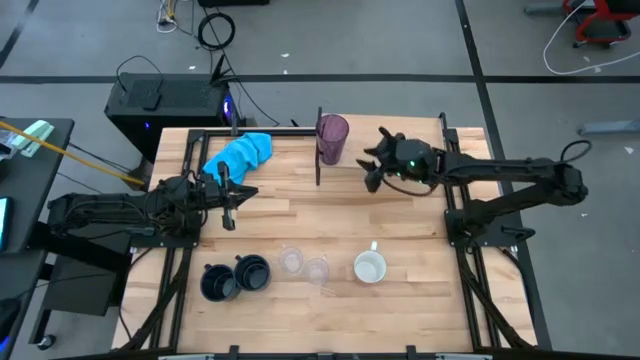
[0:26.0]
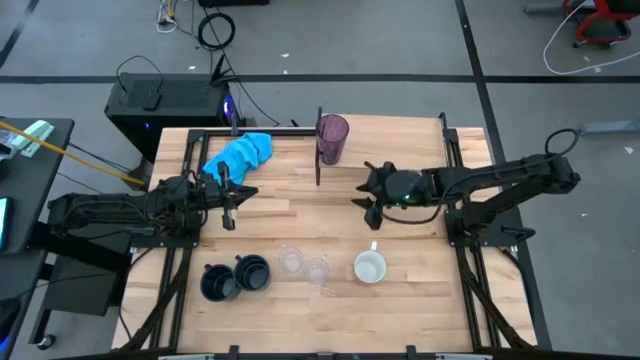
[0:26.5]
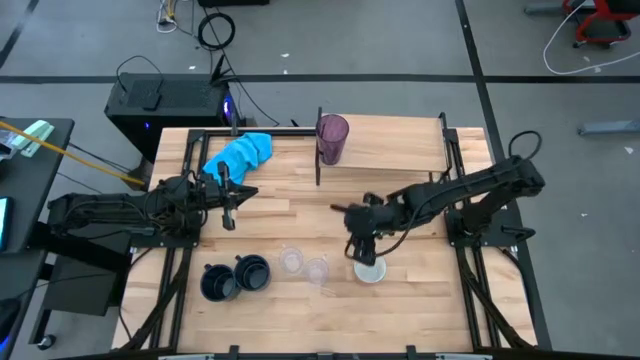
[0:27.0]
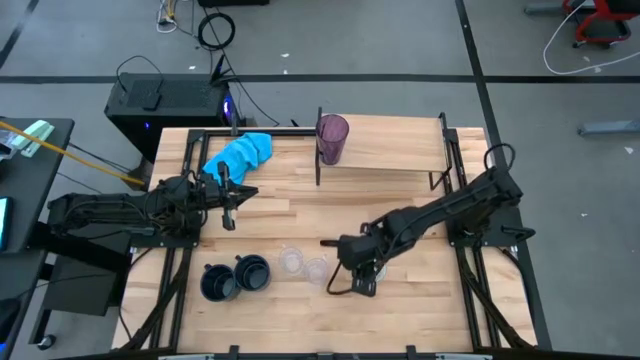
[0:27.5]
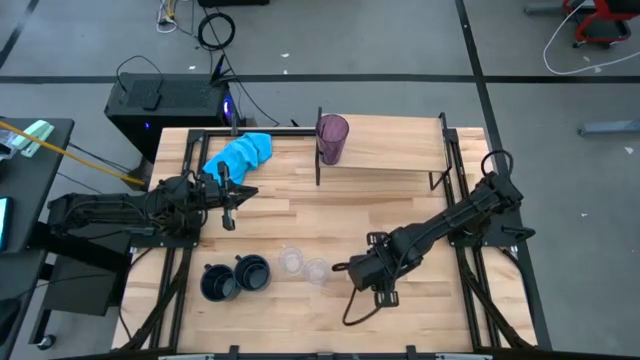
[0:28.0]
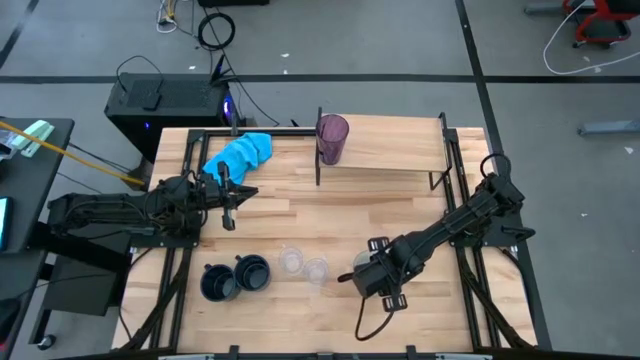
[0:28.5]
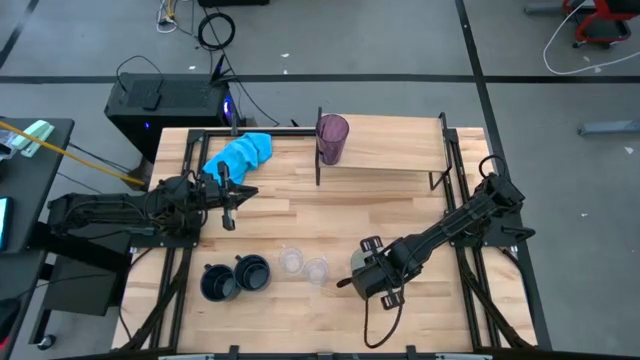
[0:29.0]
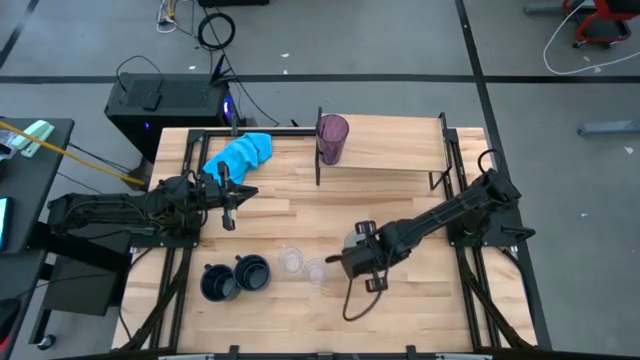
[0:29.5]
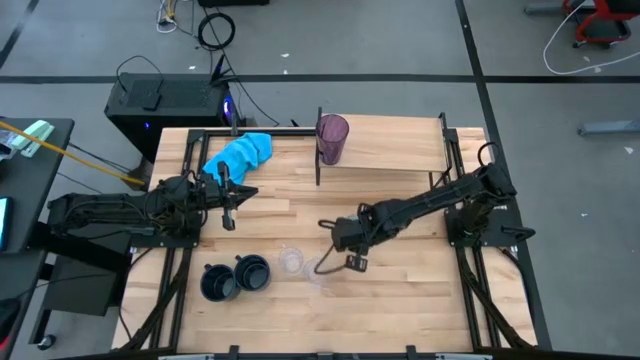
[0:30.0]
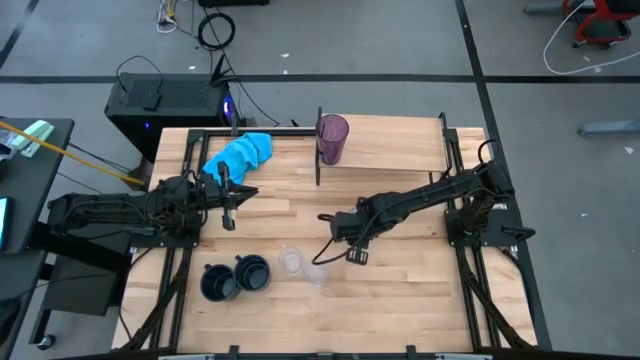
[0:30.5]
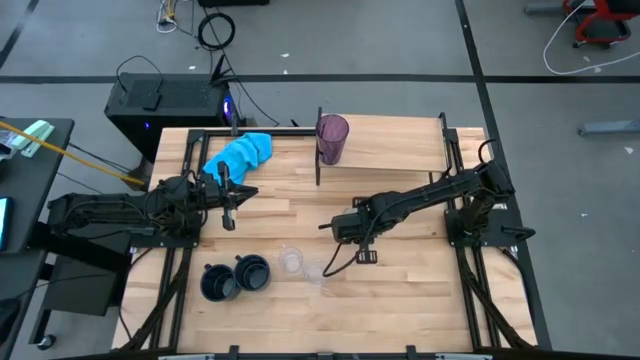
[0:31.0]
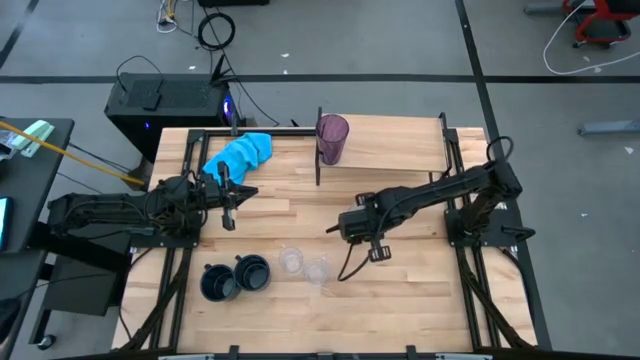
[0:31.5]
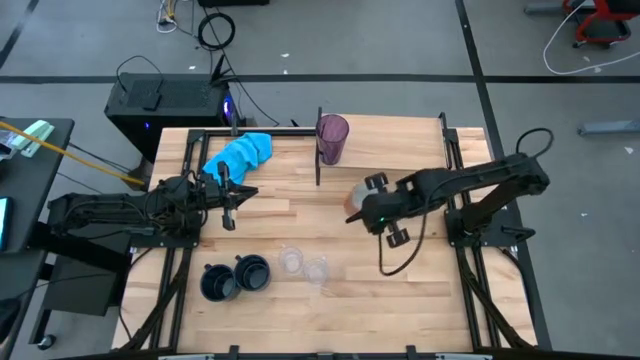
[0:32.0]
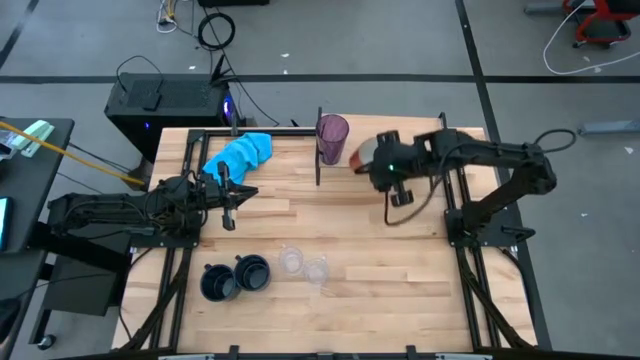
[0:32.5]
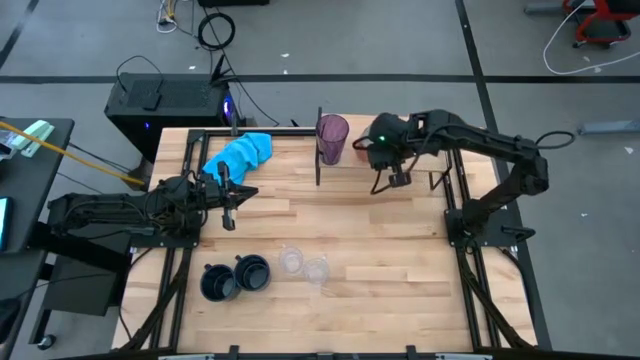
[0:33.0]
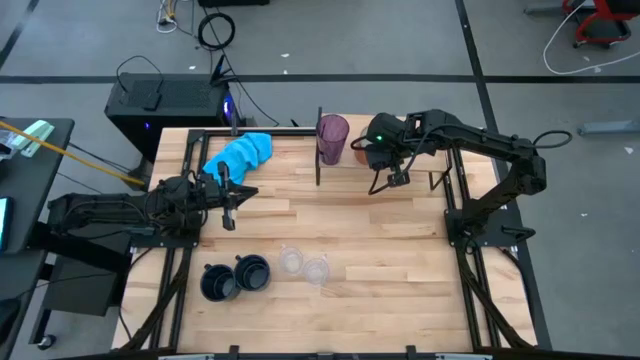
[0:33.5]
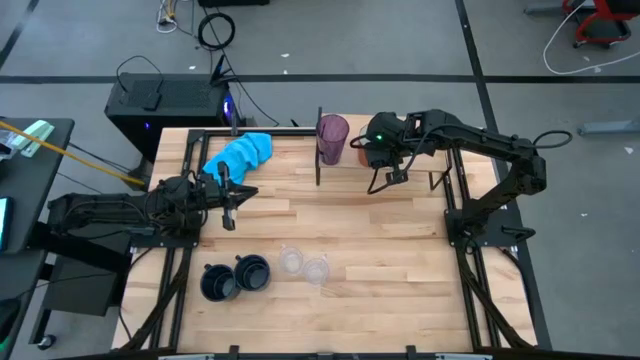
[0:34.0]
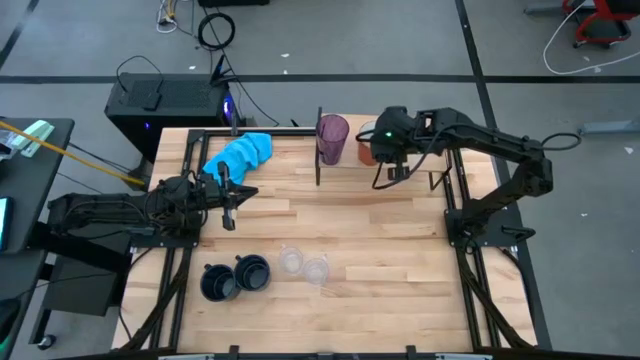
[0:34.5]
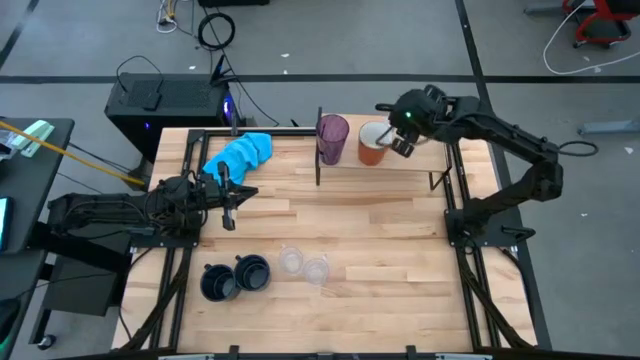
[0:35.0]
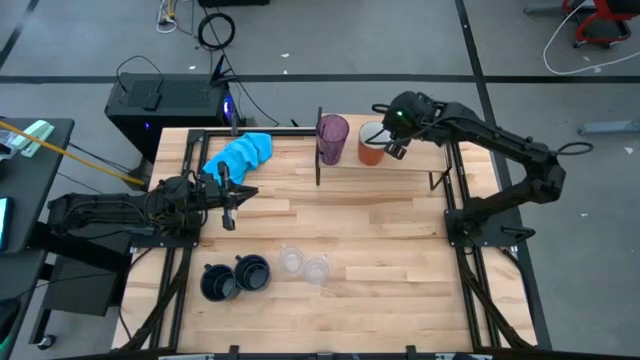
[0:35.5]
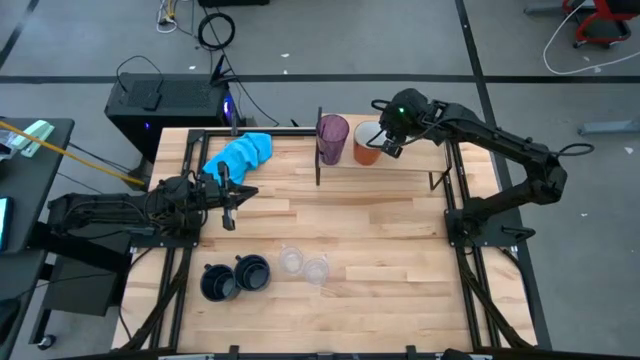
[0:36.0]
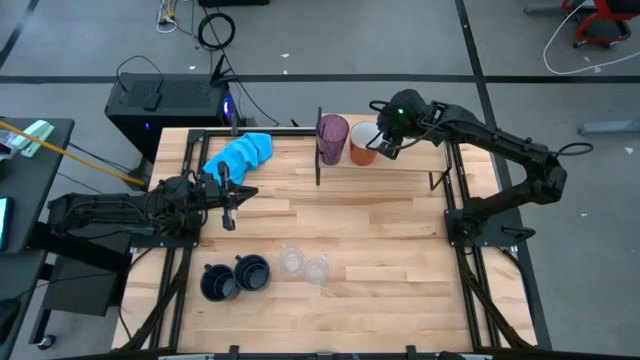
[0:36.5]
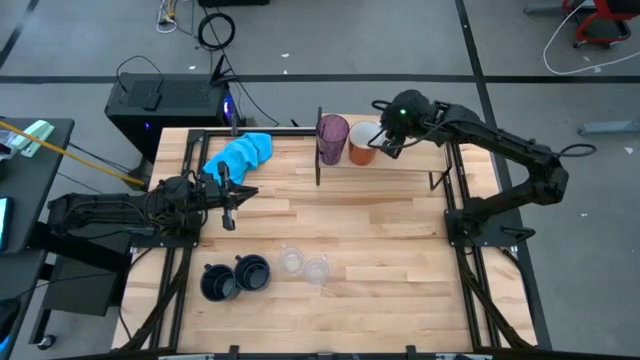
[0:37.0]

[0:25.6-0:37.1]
Task: Stack small to large cups/mugs on shelf
Put the orange mug on the shelf

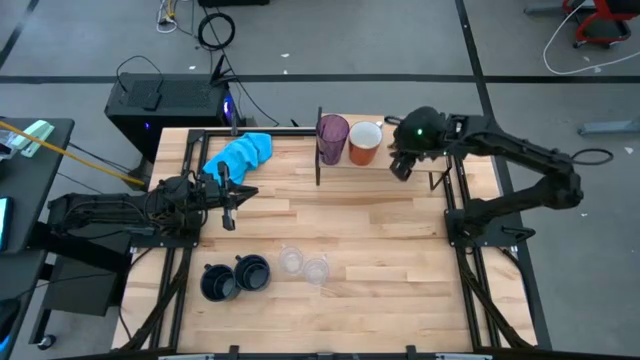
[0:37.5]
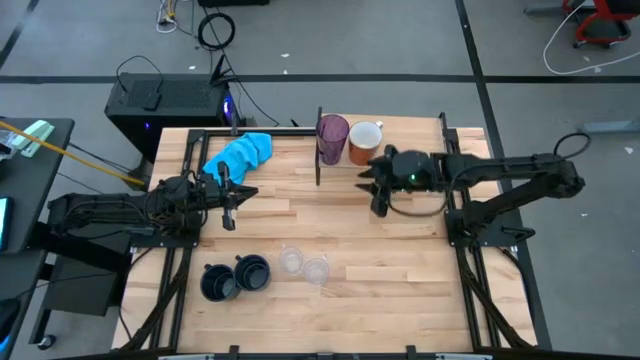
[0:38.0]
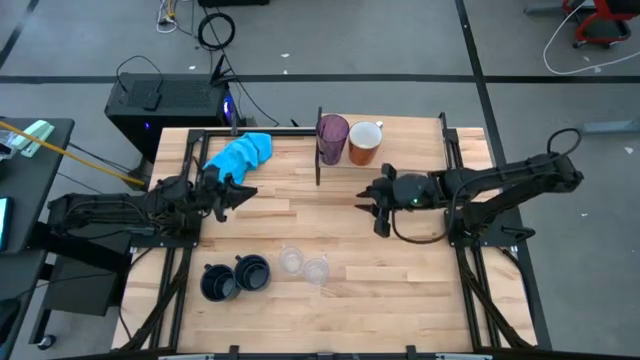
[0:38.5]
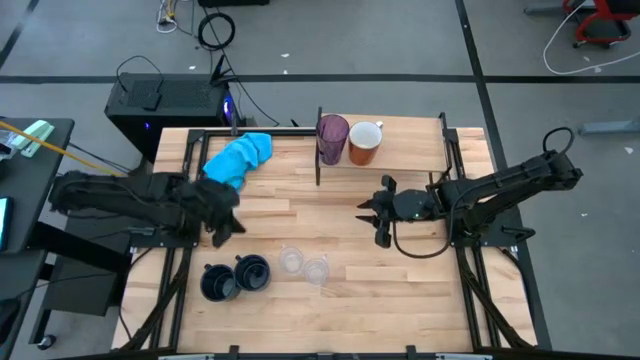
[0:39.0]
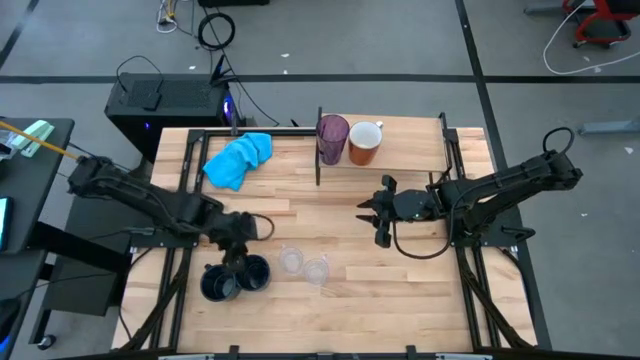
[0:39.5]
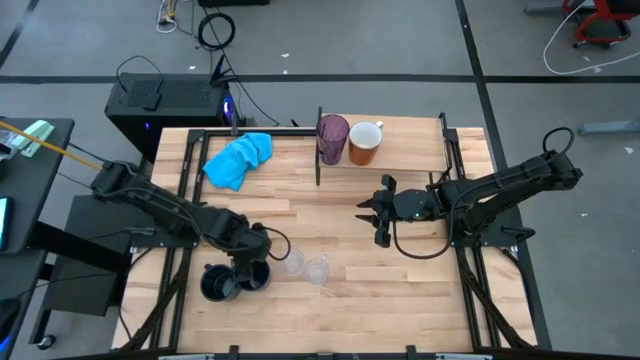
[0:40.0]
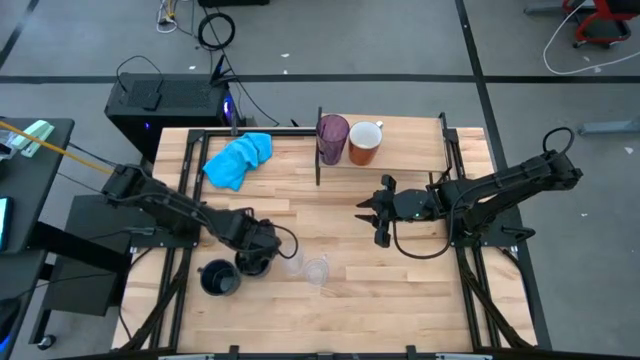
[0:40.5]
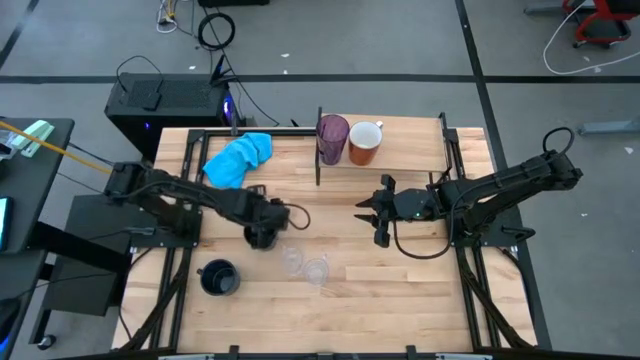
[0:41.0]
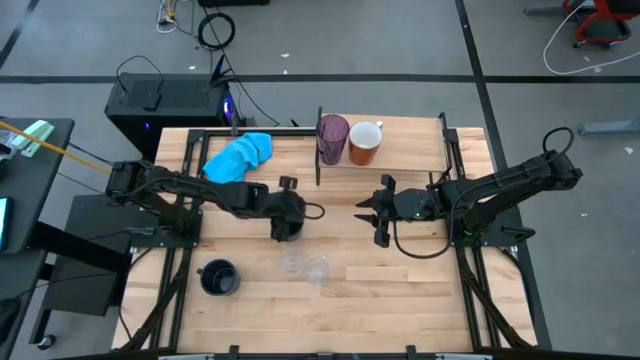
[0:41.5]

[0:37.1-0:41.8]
Move the right black mug to the middle of the table

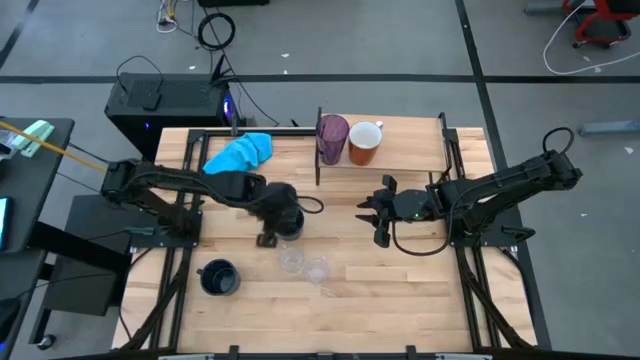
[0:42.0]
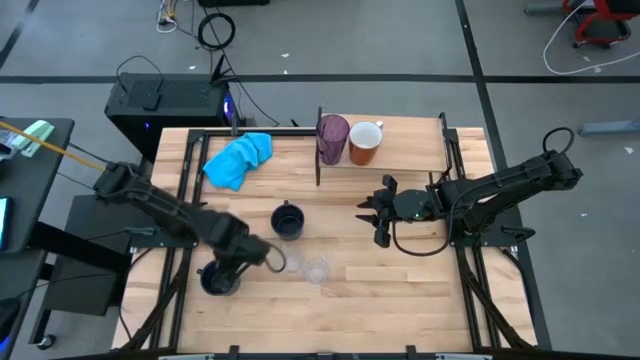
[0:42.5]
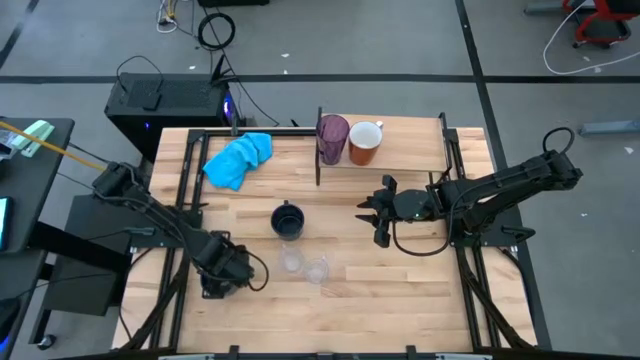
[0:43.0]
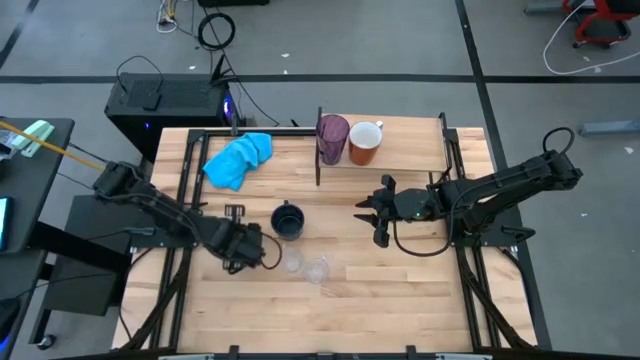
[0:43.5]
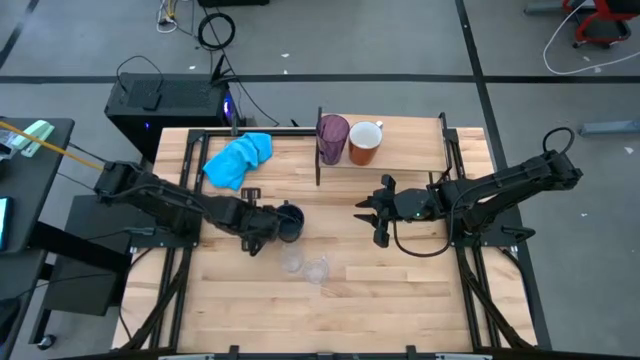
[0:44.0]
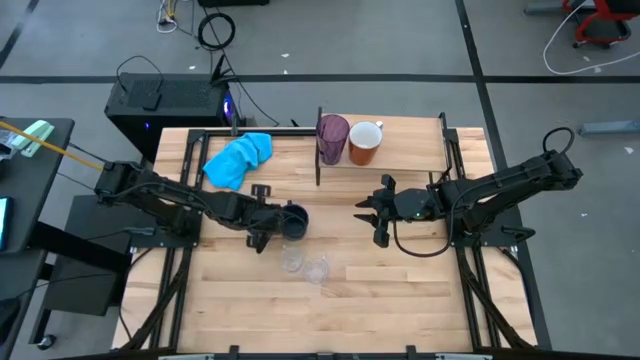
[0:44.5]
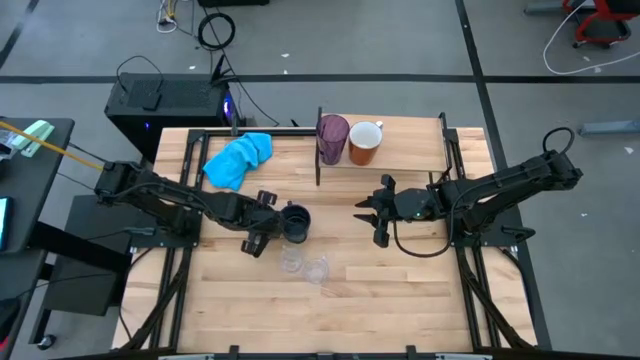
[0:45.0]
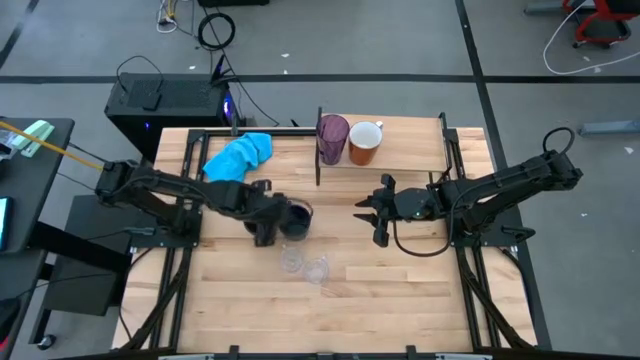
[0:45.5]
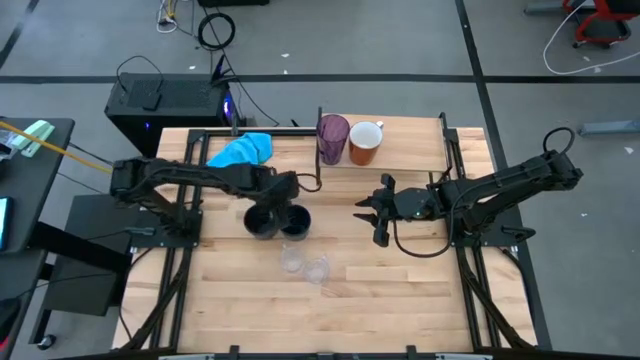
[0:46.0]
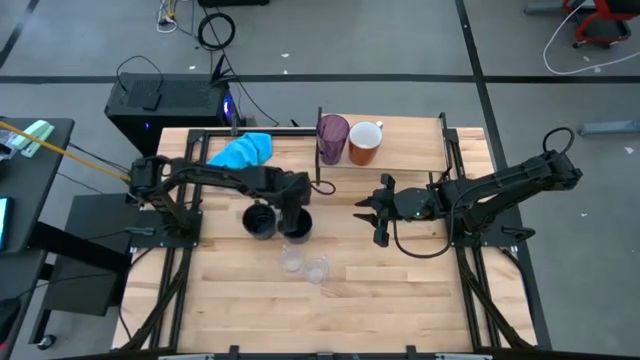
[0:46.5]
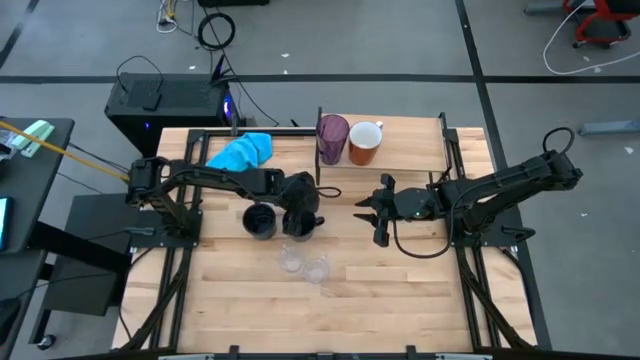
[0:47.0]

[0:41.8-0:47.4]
Move the left black mug to the middle of the table
